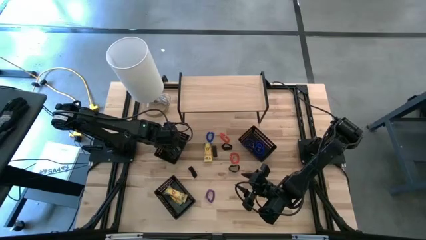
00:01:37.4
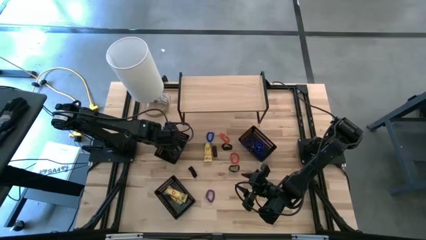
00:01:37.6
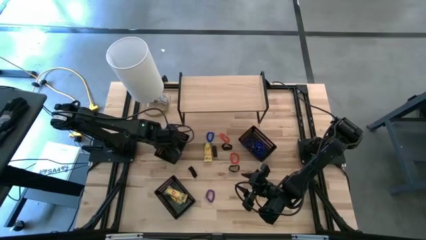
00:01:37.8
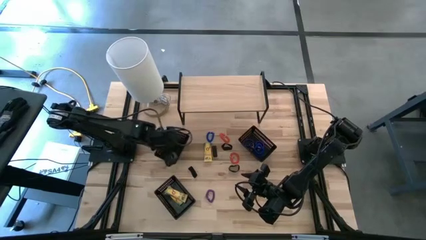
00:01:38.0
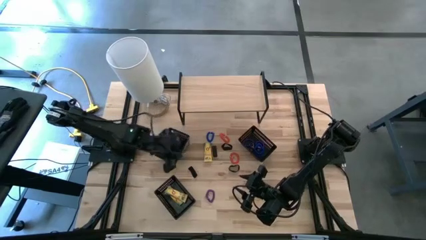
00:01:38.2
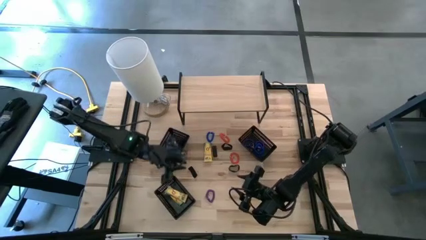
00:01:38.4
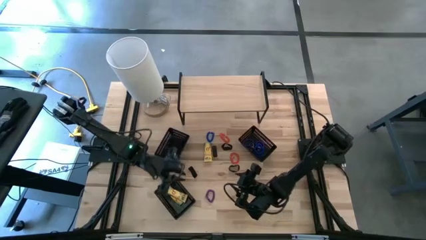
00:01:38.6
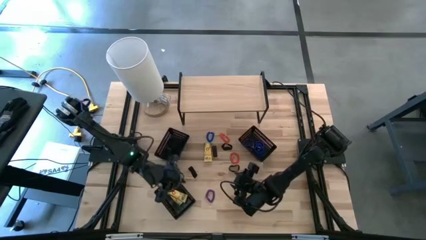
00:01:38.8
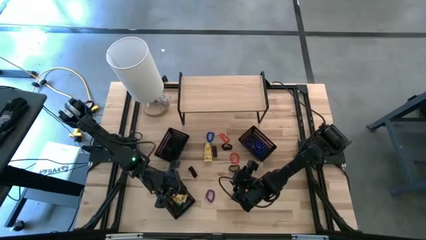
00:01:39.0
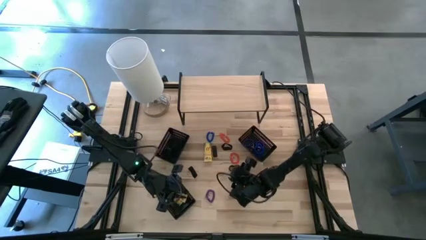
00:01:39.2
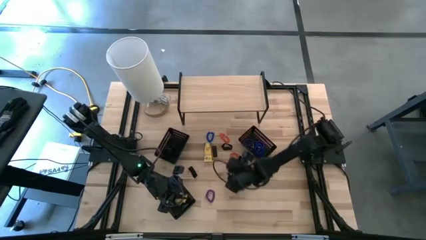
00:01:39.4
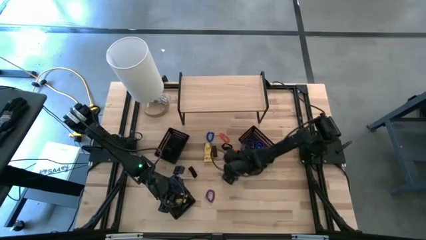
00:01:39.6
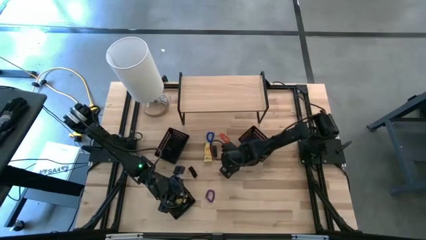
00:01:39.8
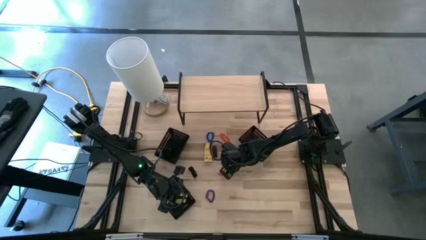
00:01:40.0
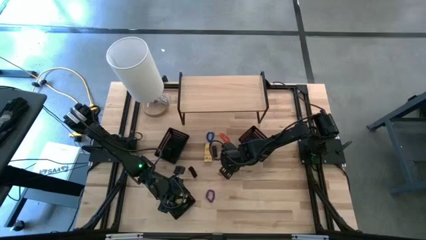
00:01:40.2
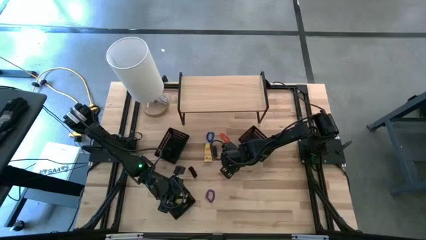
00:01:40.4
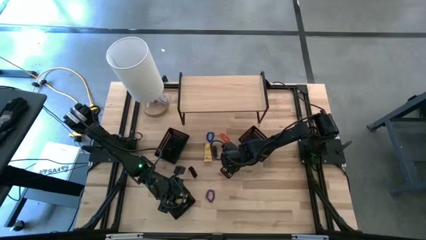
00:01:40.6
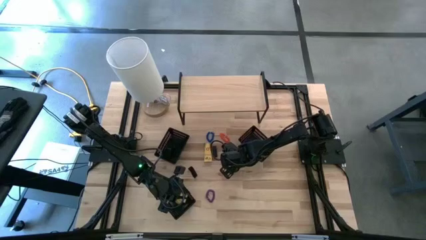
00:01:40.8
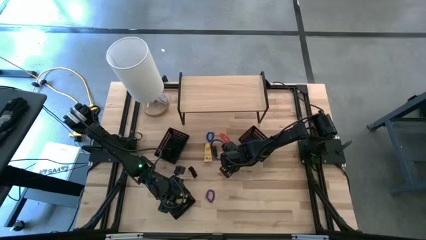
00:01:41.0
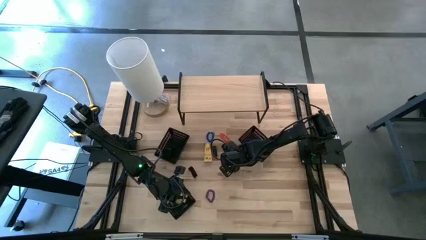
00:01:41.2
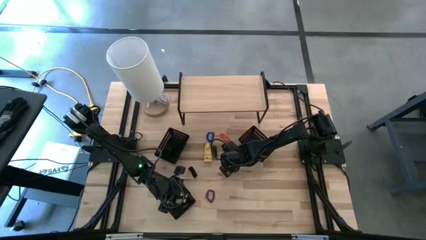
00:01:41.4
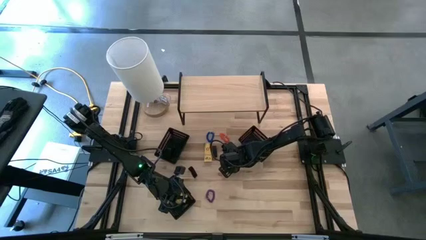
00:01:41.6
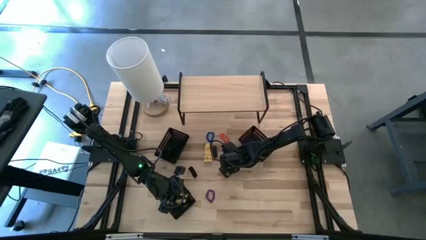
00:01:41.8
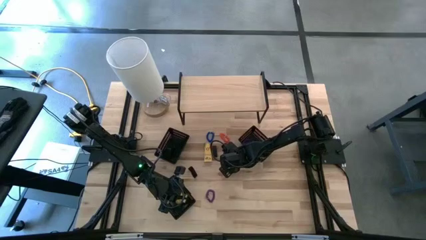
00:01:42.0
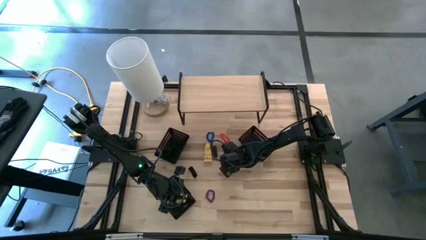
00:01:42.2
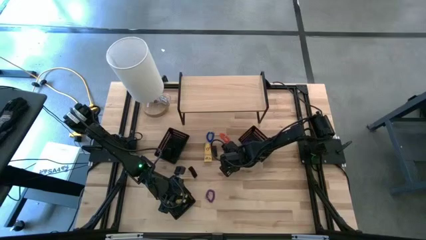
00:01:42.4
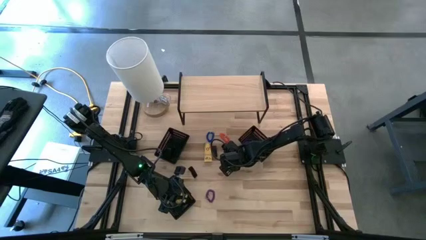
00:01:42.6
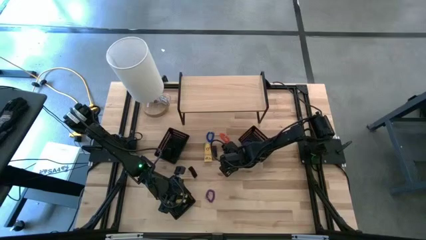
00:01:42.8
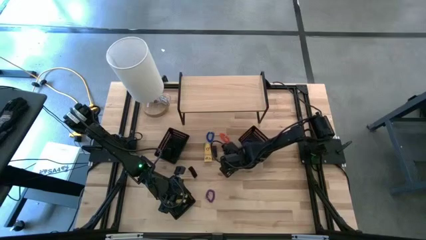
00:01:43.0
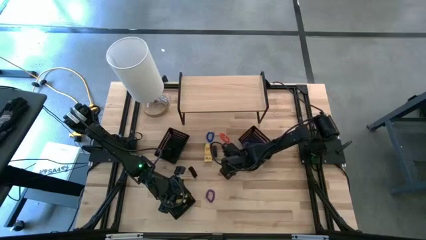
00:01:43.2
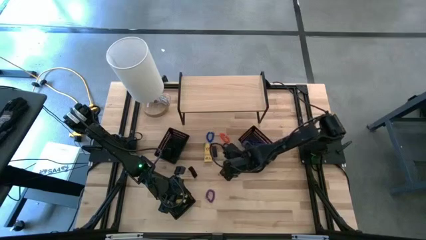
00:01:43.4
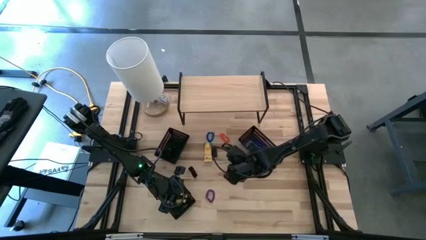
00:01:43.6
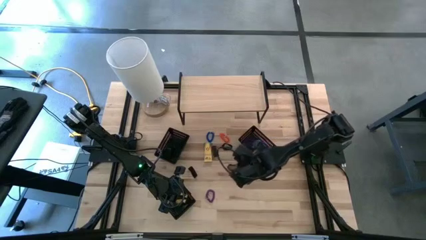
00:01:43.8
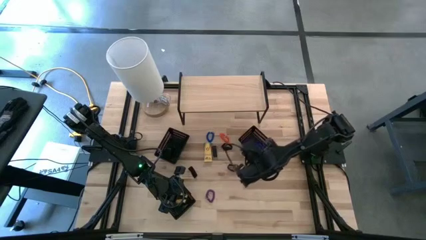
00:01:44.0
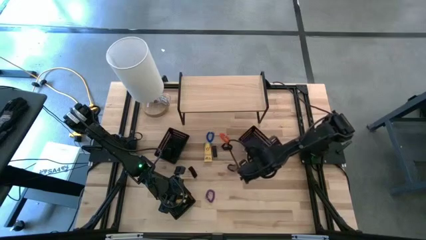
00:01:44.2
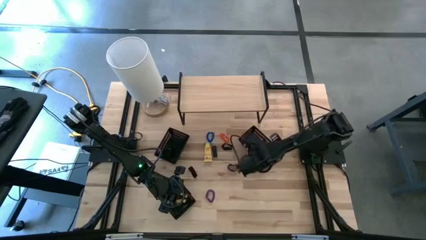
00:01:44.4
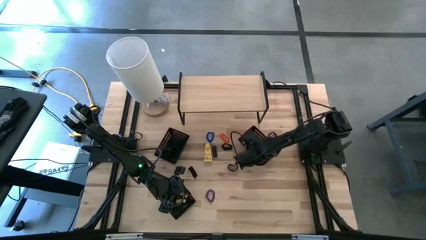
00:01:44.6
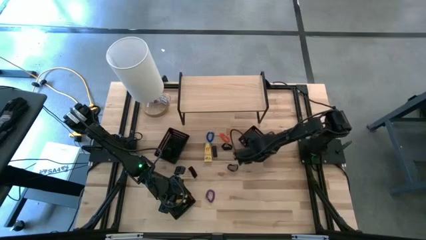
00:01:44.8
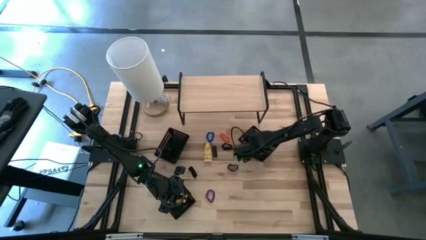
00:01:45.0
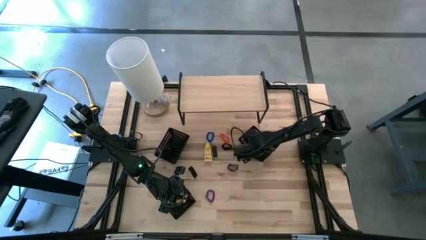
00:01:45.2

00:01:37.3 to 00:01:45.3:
Task: Pick & Place Office Desk Supplies
Put the bottom orange spring keychain into the top right black bin

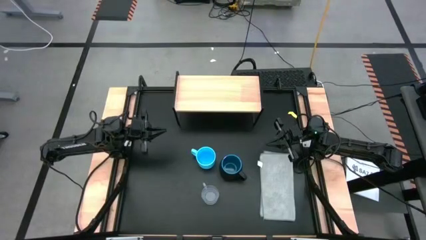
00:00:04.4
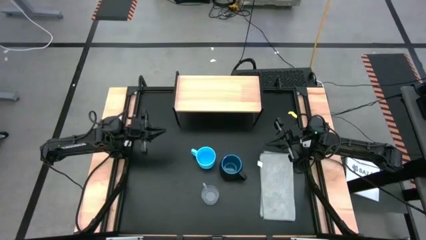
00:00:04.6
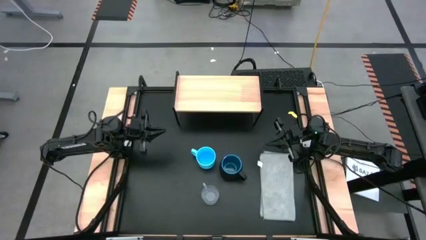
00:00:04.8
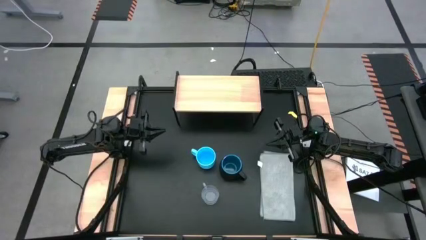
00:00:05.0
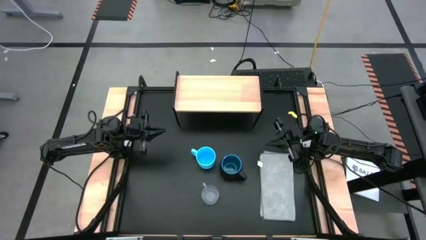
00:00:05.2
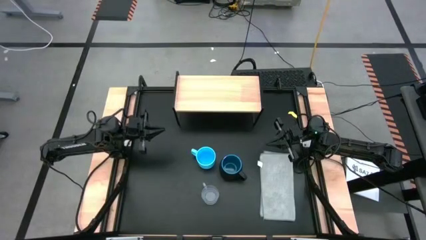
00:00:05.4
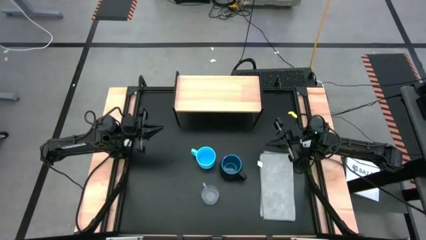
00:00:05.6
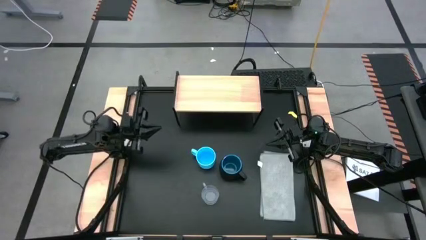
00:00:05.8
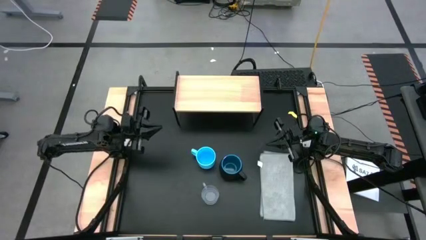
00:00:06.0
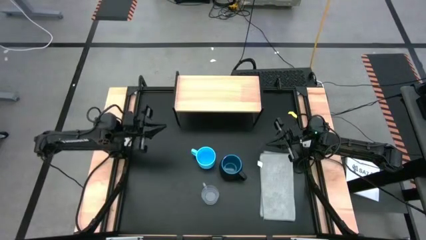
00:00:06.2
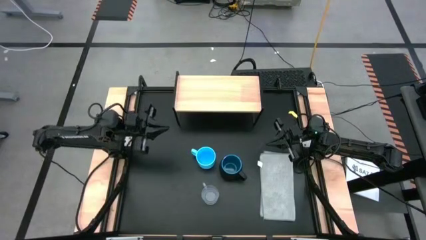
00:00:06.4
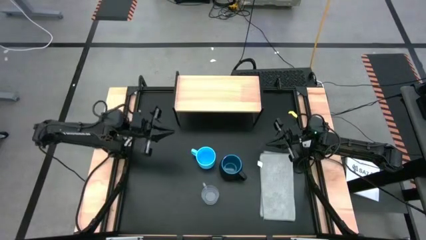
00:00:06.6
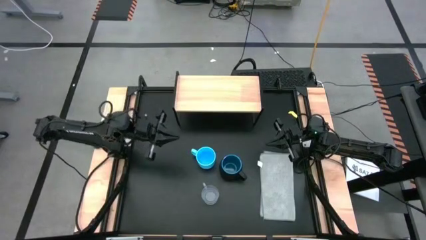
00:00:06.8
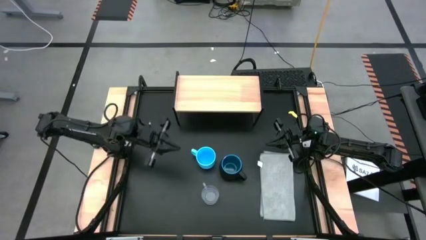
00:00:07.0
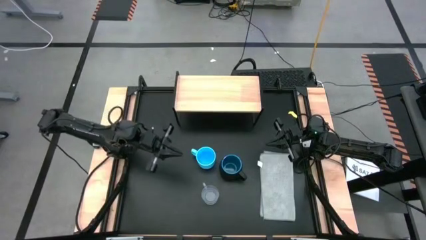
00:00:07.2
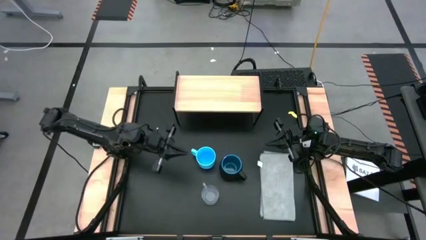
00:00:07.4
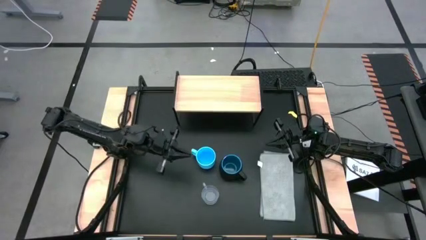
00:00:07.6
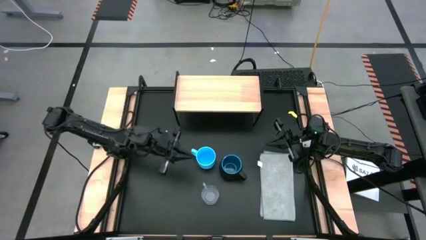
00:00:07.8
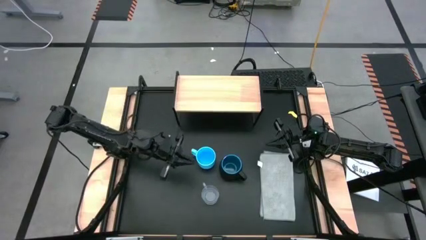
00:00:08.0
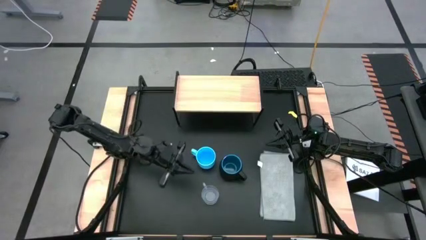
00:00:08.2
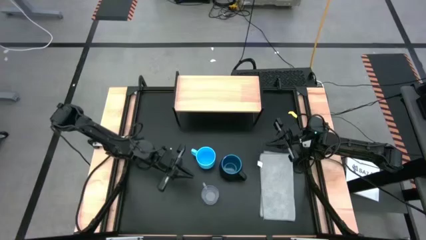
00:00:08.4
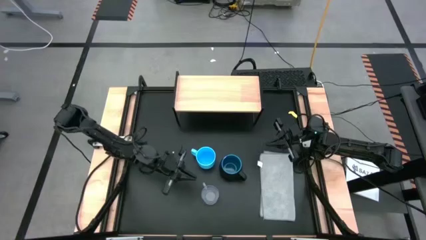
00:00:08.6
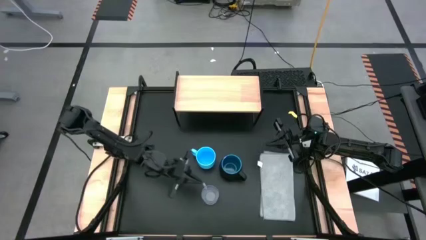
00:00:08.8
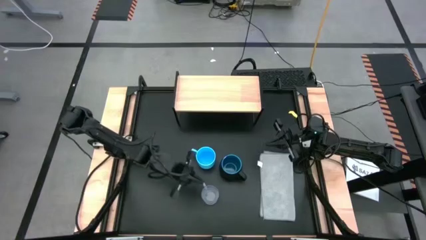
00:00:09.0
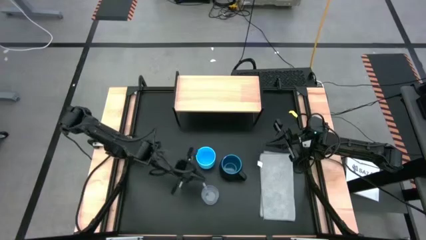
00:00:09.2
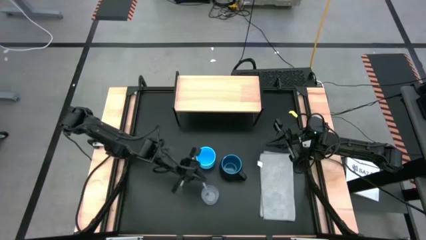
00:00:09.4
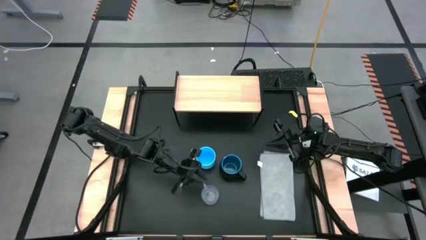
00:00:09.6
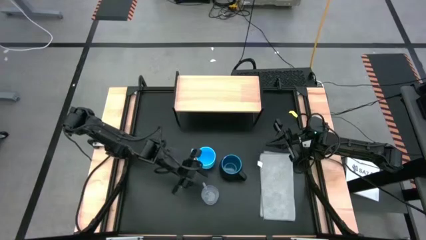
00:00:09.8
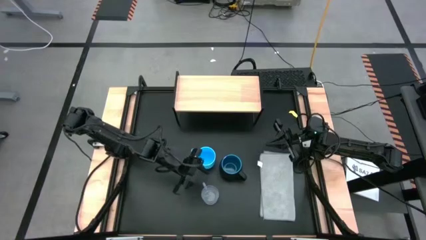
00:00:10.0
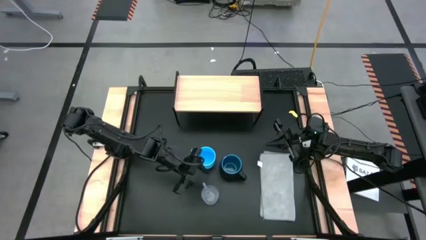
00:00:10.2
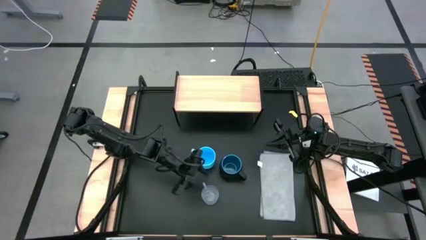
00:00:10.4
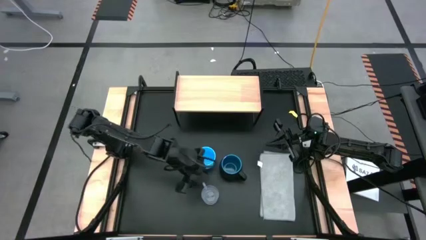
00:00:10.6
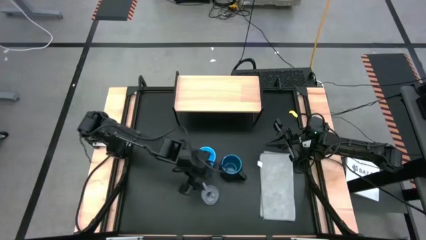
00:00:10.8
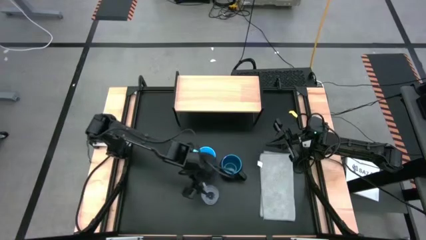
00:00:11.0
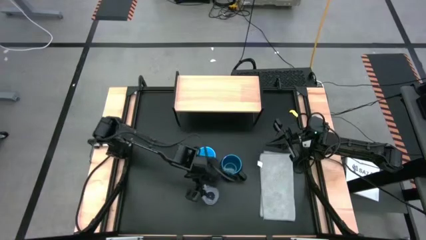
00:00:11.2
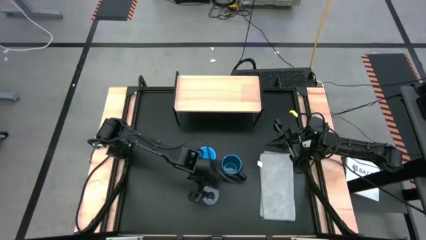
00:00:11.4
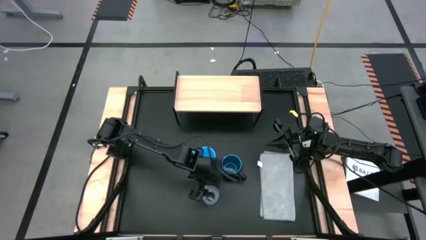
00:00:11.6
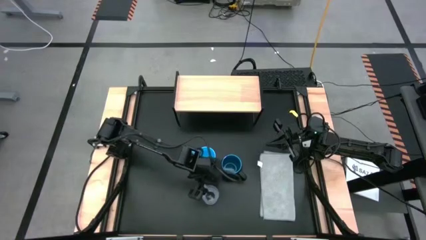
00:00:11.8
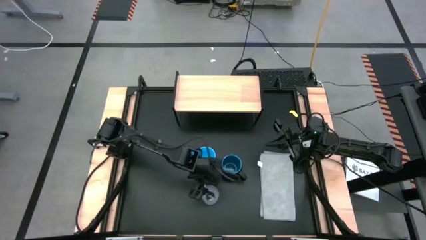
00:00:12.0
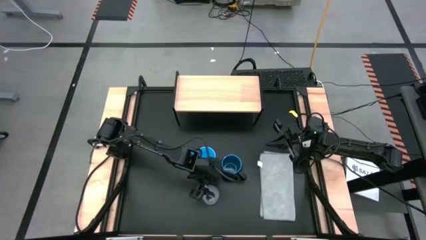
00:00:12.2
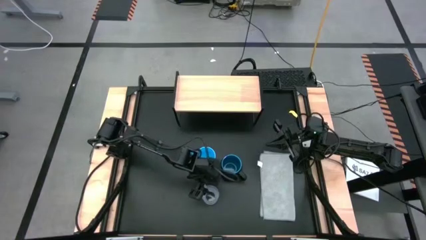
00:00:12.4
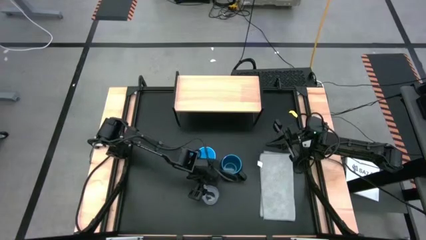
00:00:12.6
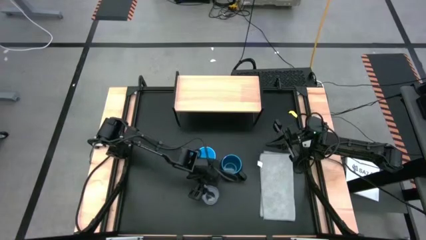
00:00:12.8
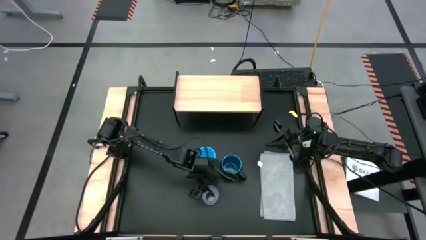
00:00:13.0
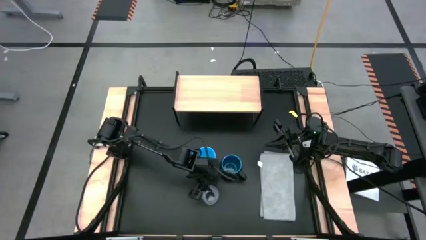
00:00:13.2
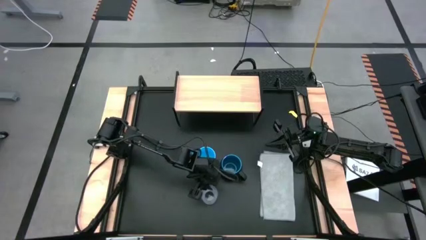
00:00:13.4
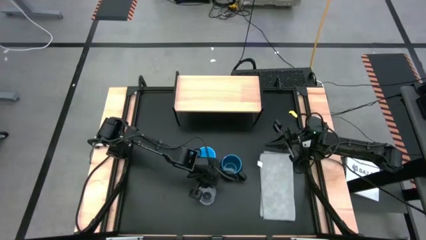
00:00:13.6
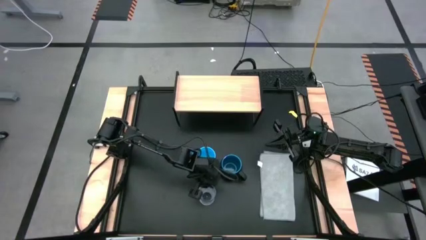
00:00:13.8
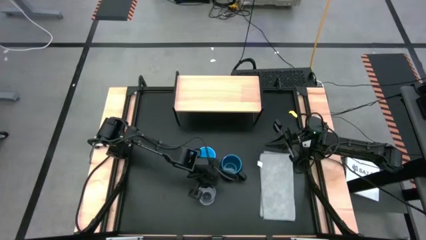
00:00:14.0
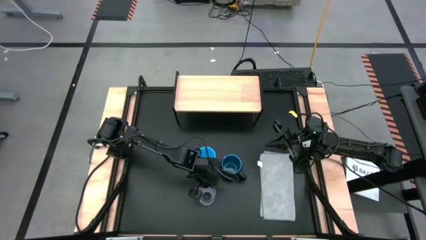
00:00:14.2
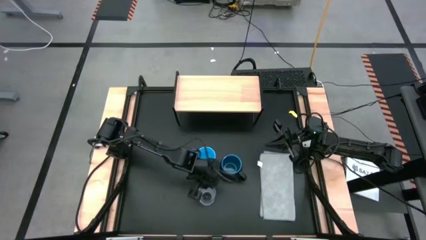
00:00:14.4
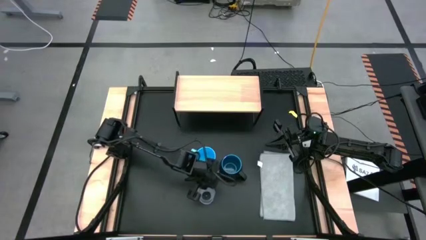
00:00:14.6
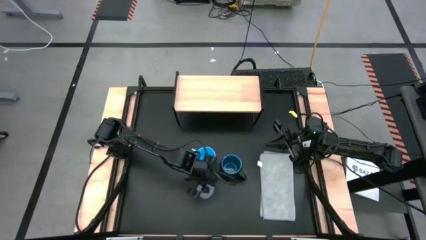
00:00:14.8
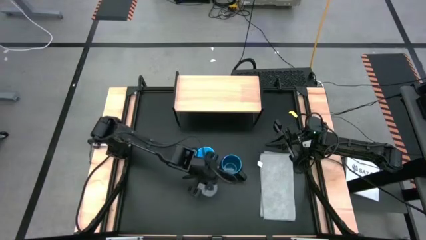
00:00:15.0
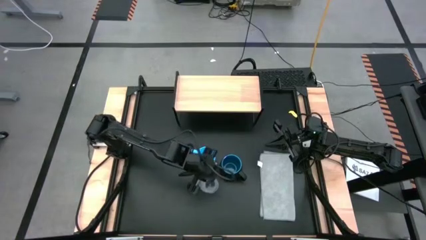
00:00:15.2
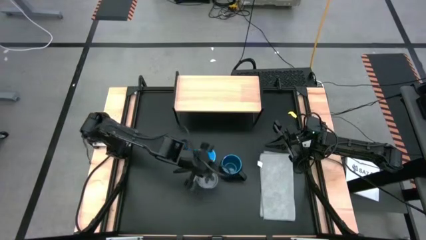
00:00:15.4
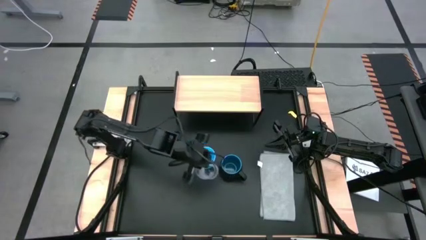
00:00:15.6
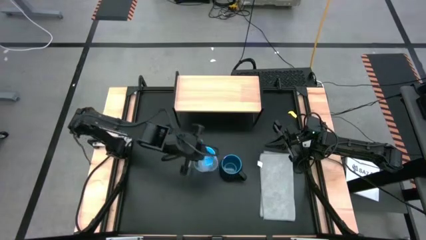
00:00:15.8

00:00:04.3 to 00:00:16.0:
Task: Stack small to large cups/mugs on shelf
Put the transparent mug on the shelf
